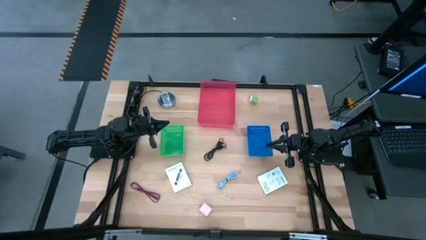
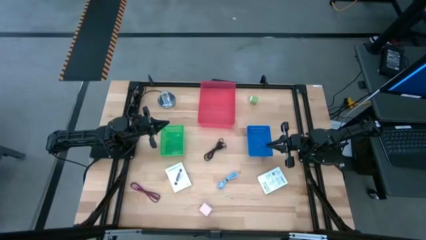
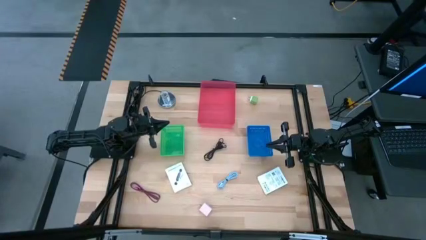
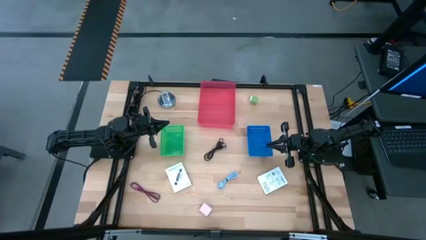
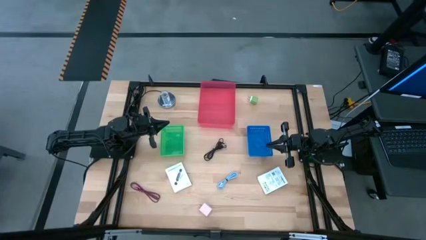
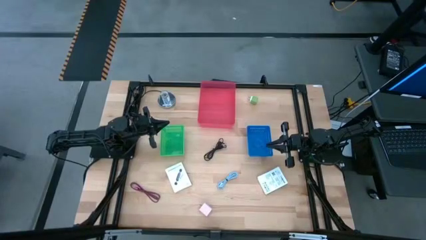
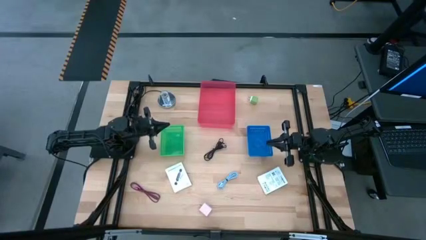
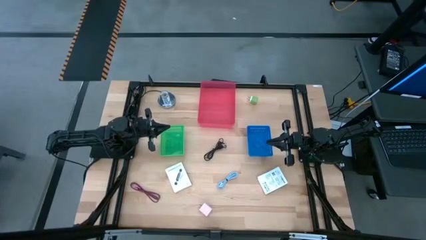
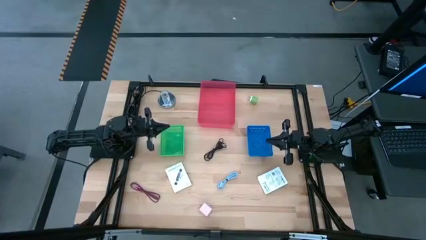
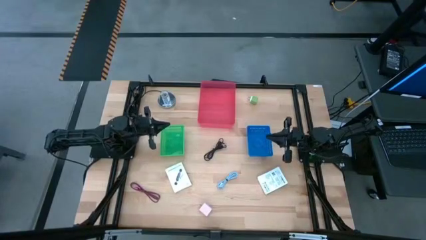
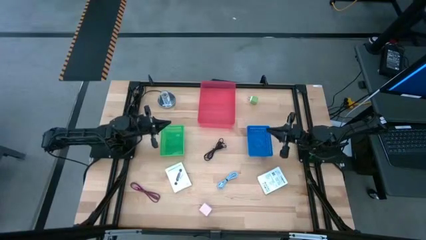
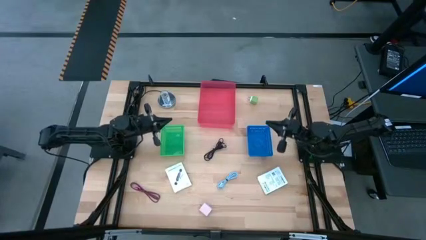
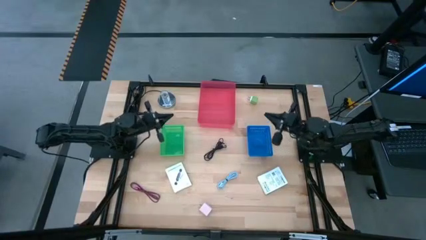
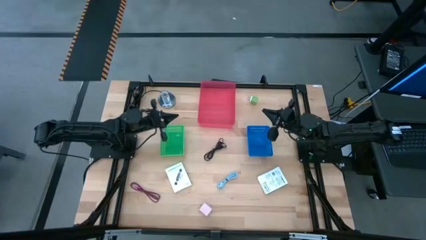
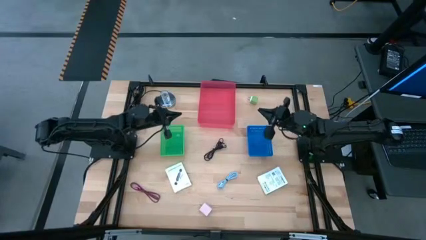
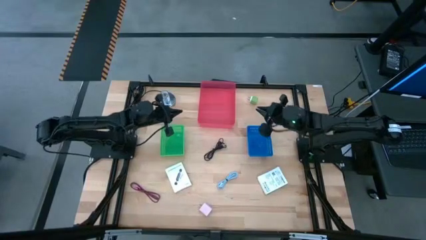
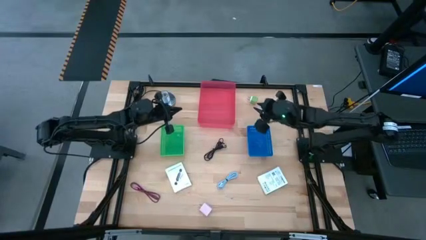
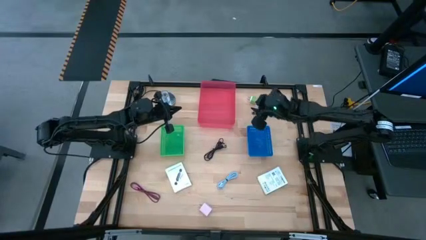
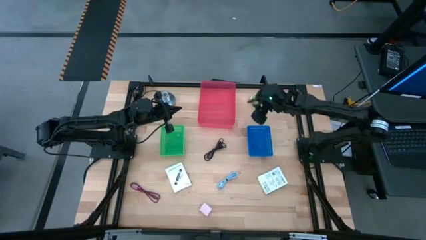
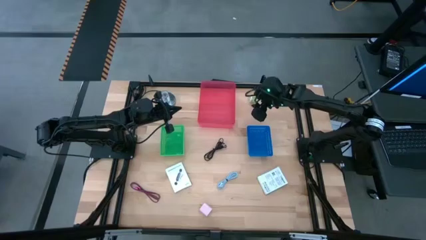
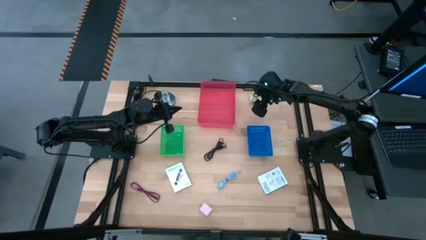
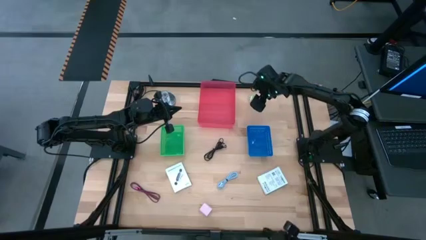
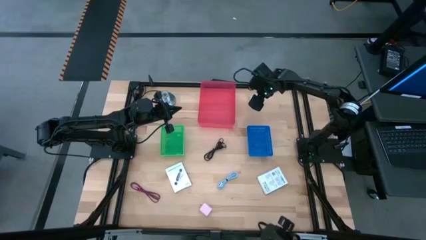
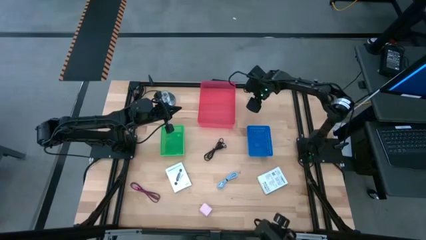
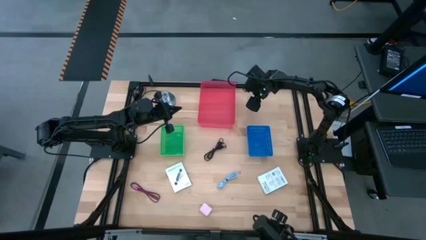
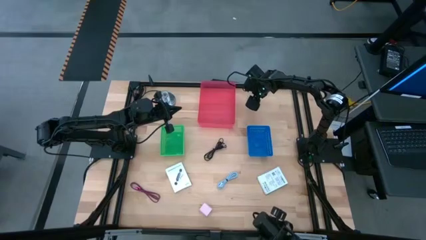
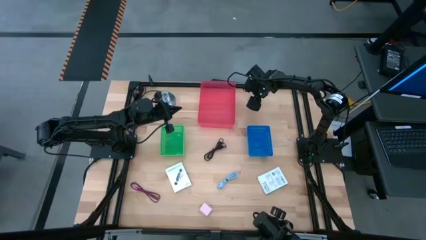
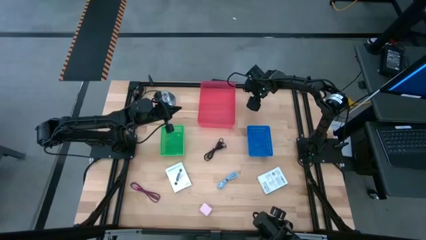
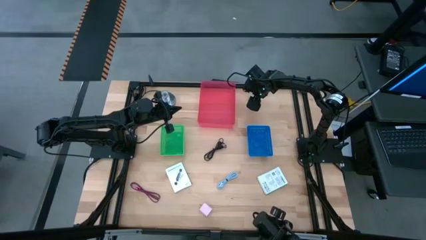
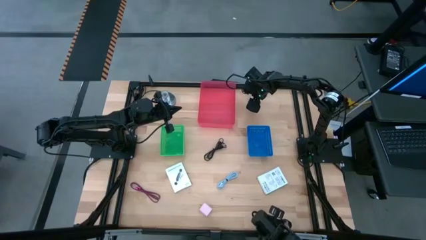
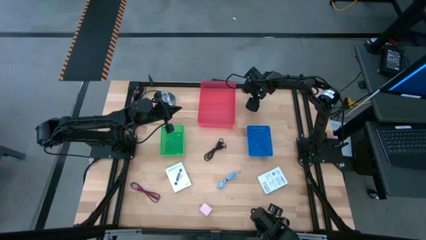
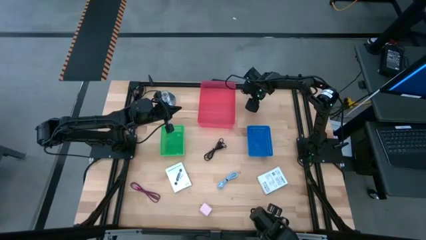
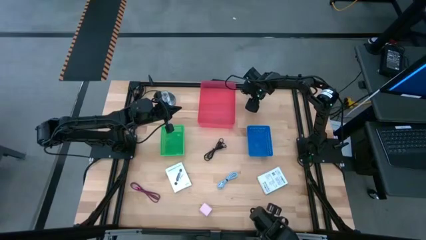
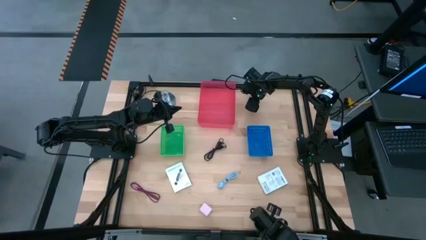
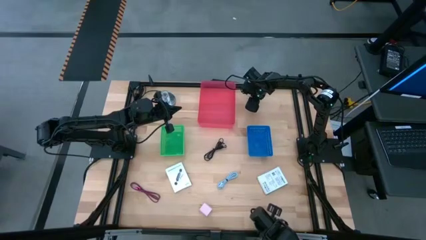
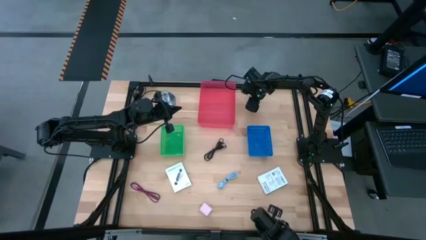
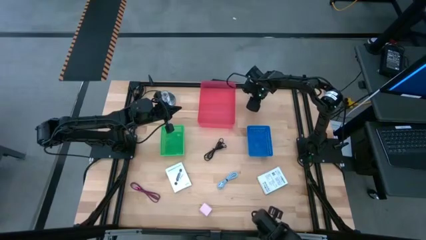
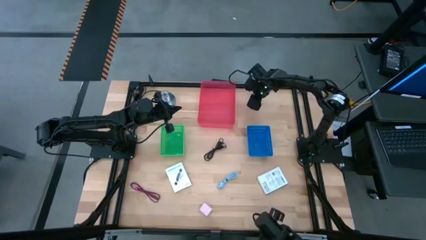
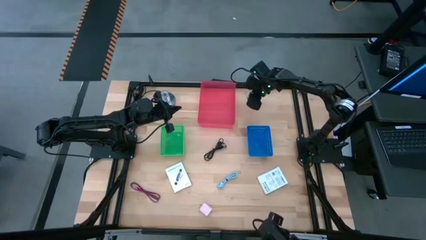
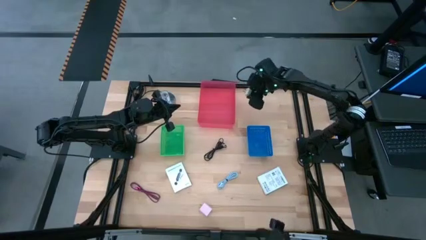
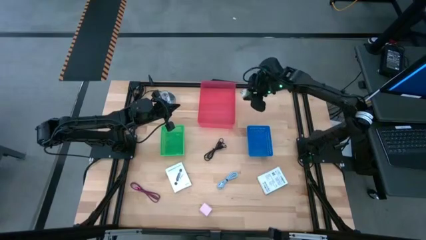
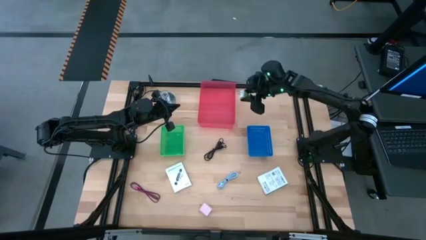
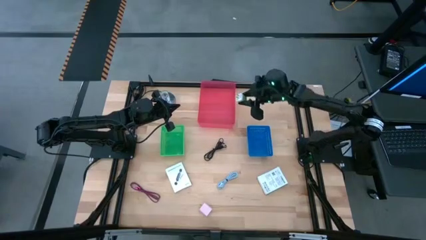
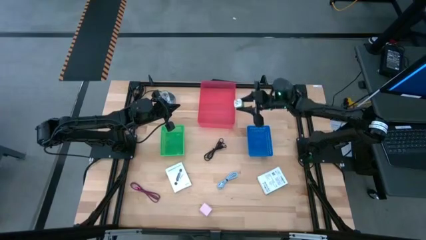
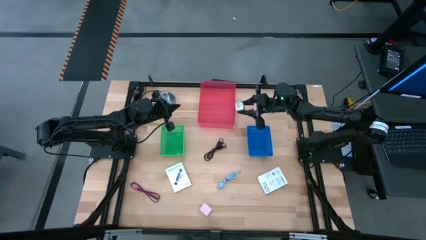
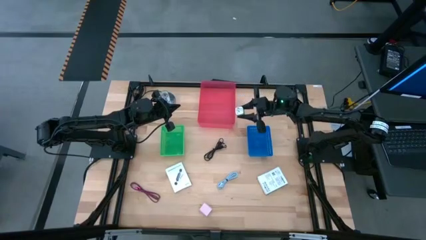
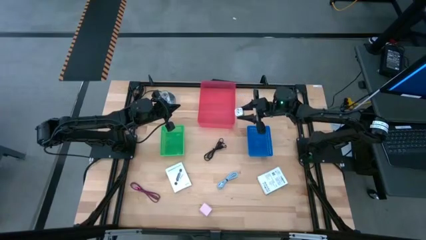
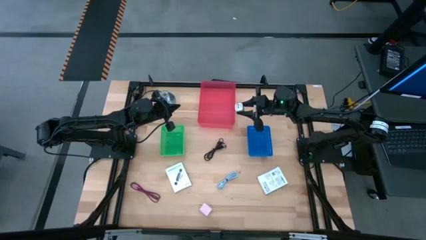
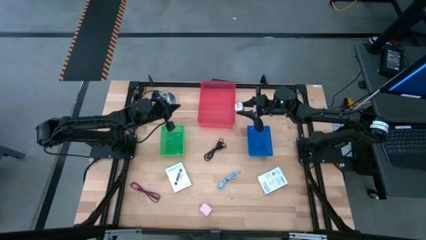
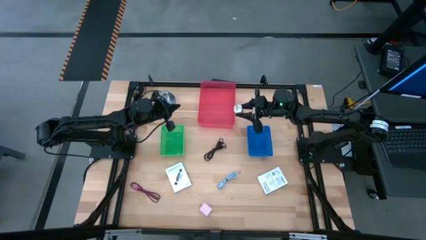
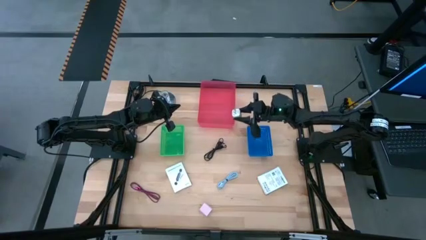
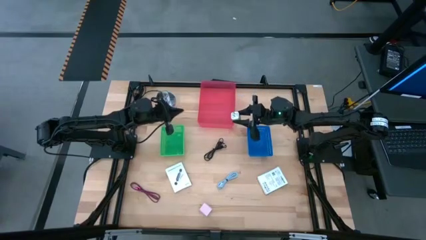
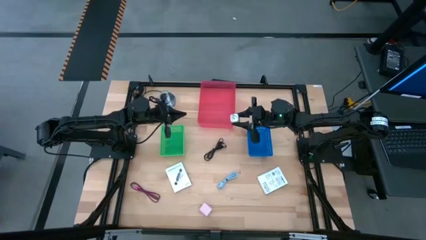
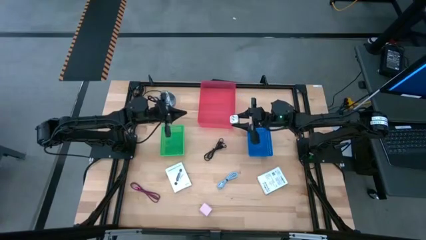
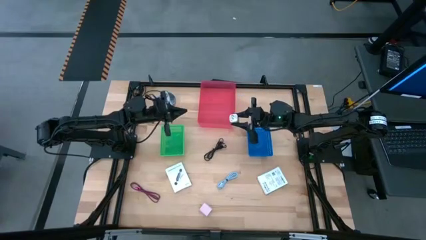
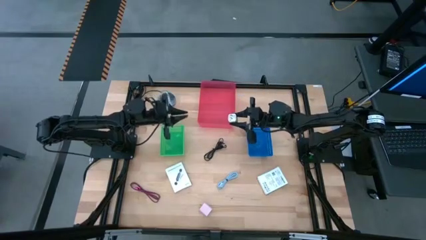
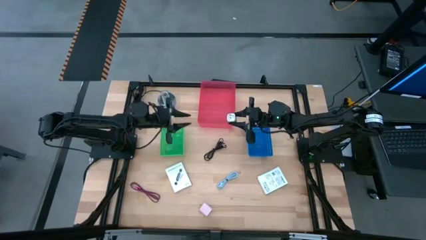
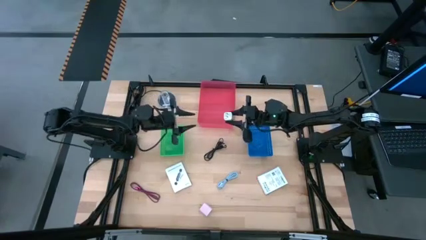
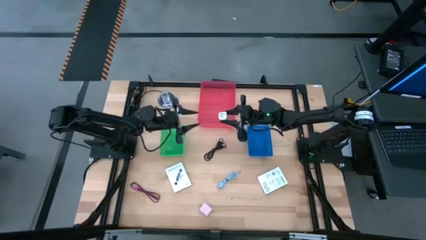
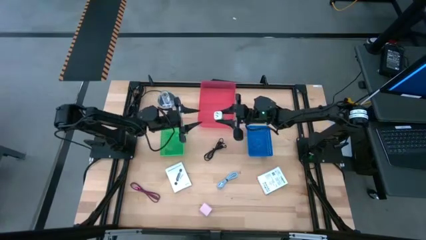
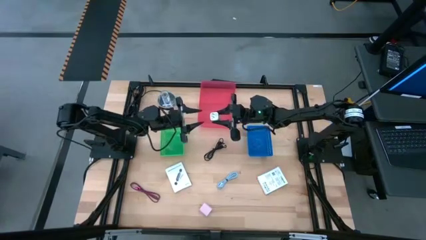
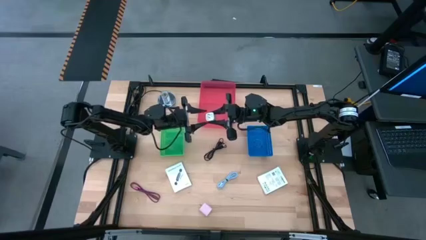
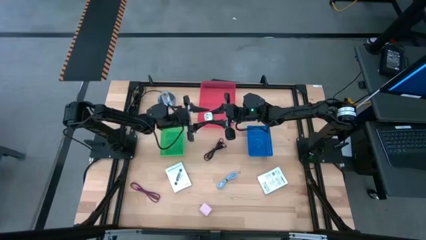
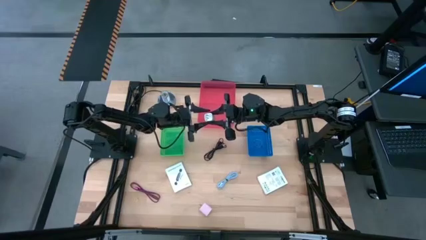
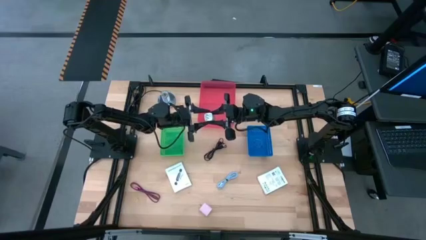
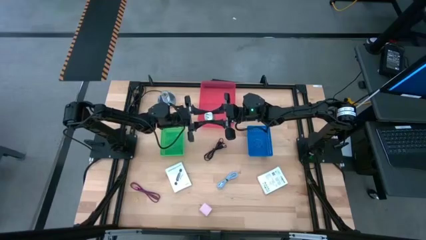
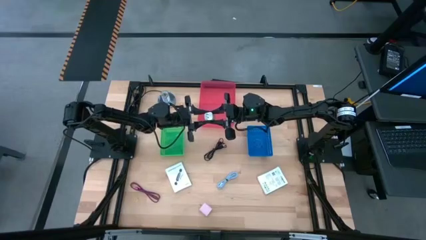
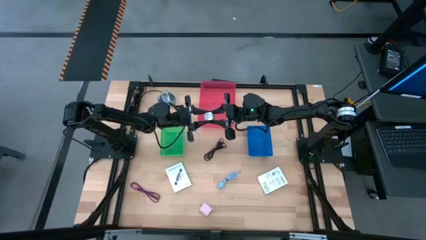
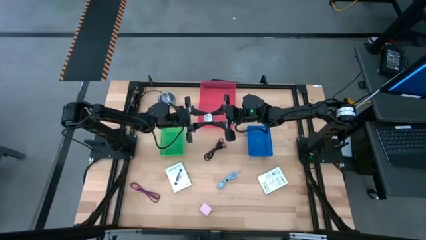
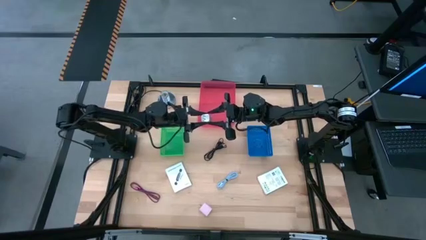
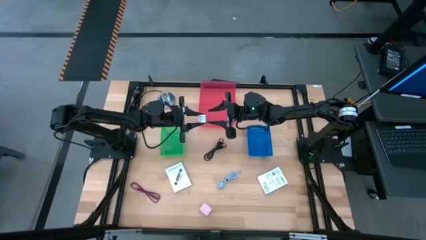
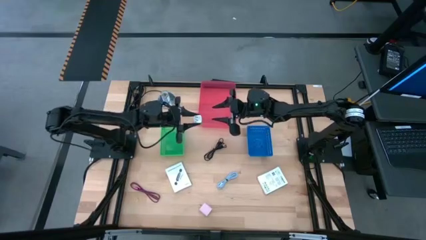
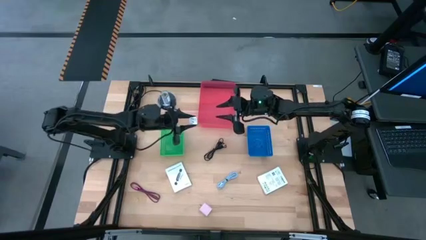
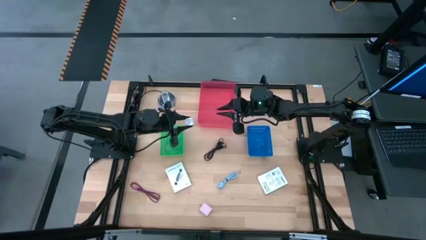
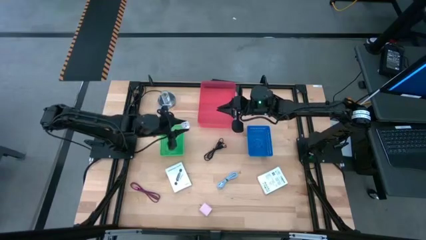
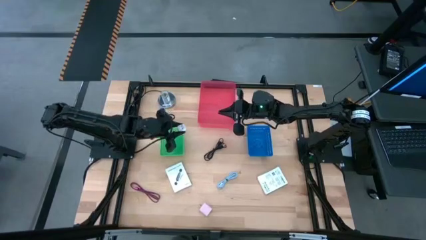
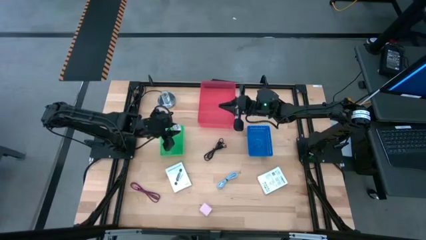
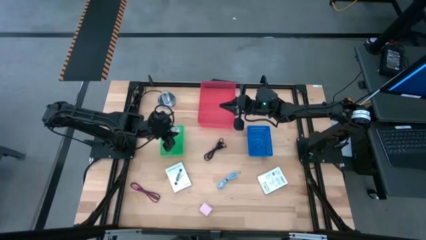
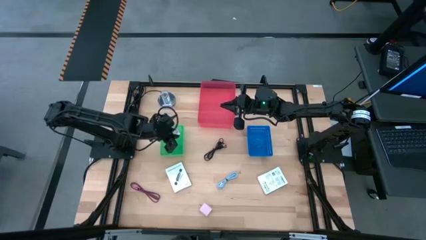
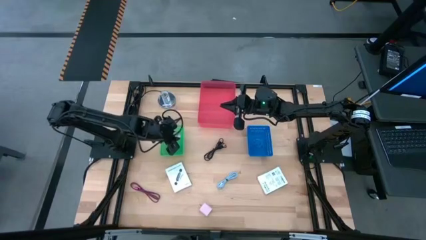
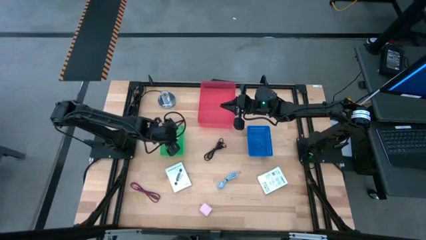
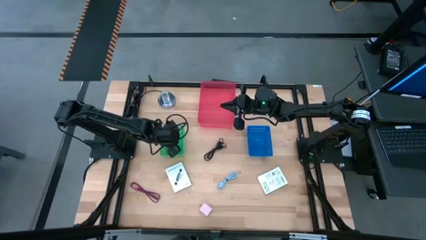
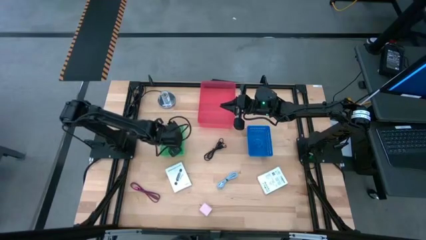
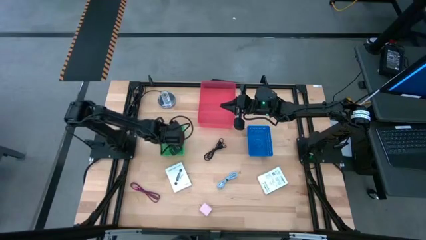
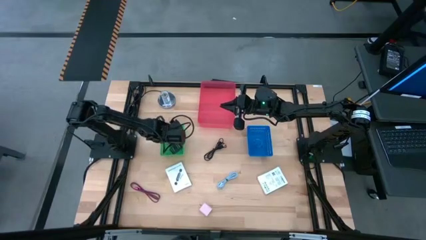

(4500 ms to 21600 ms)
Task: Pick and place items into bin
Put the green charger adapter into the green basket
